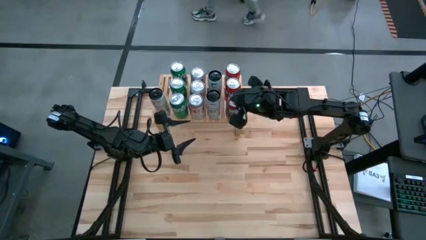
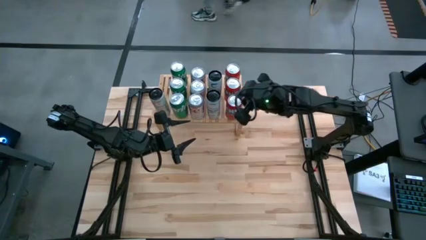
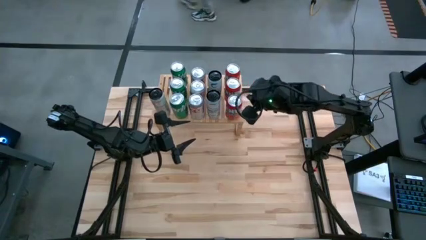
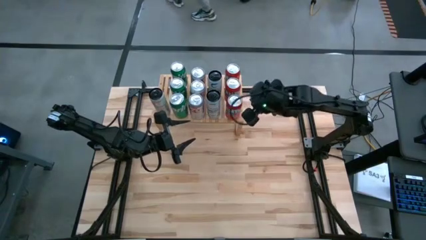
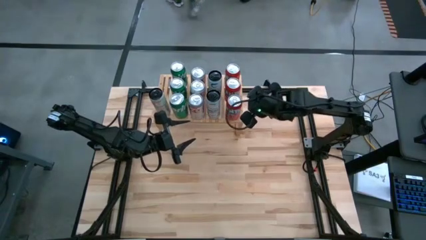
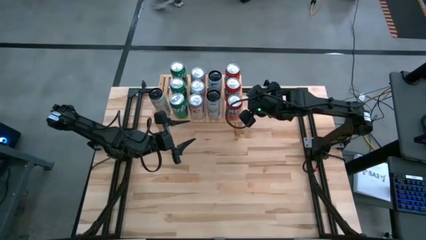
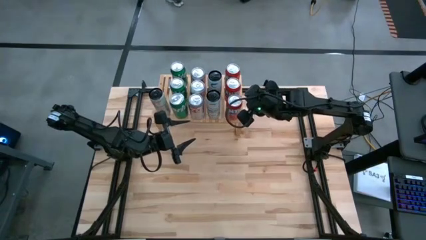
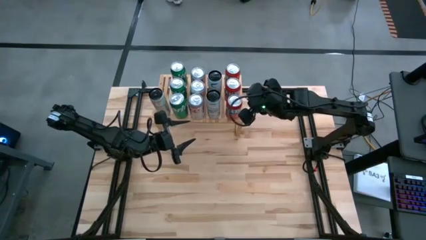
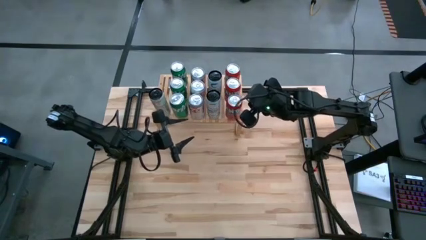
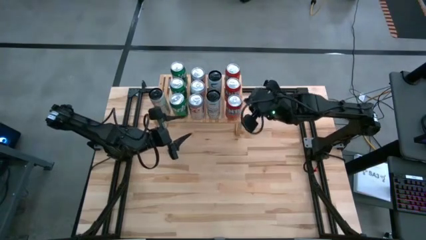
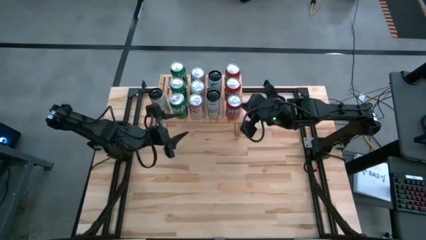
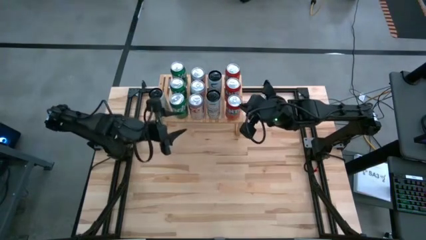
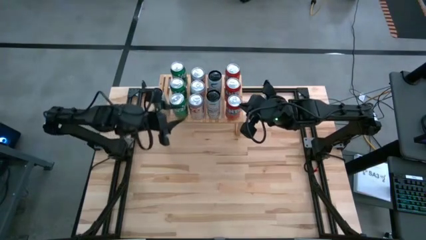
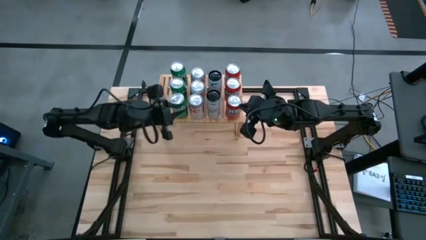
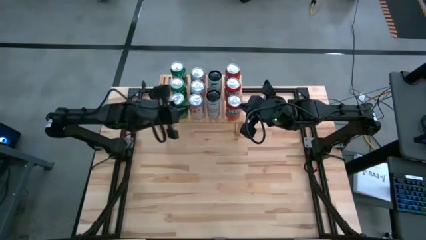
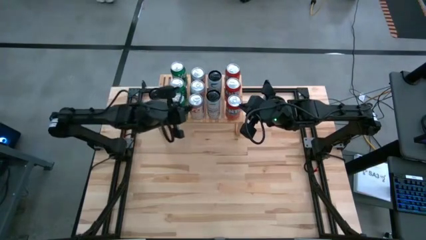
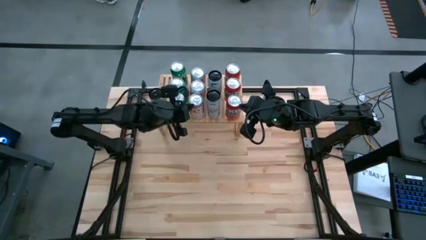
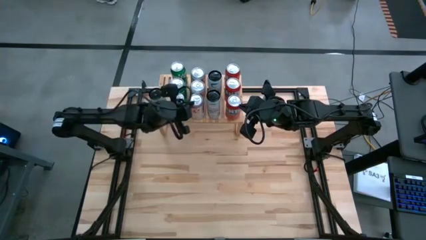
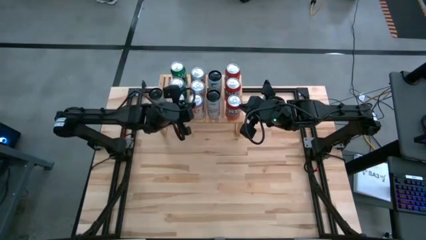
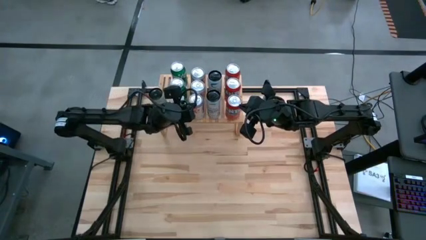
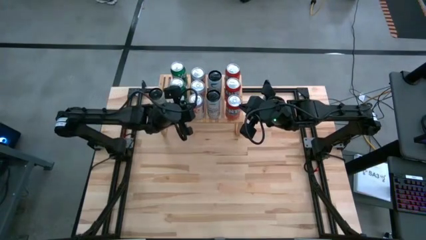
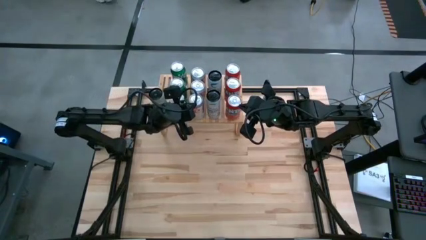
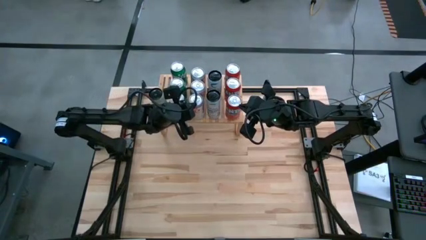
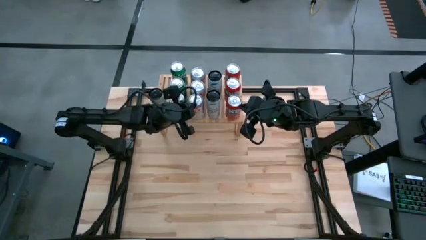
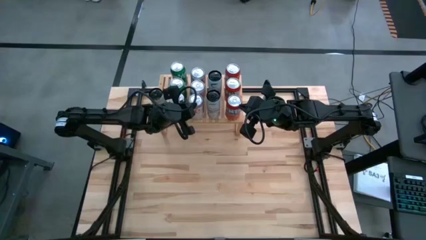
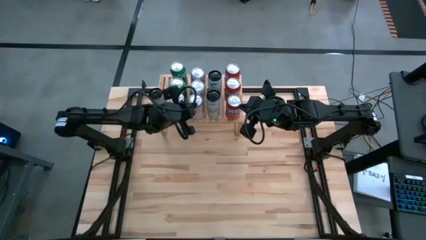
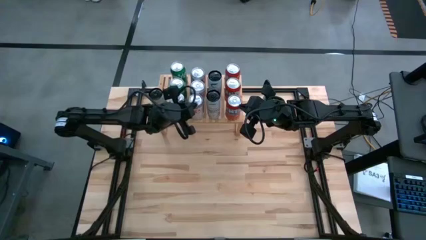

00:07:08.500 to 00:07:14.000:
Task: Place canned beverage on shelf
Adjust the white soda can

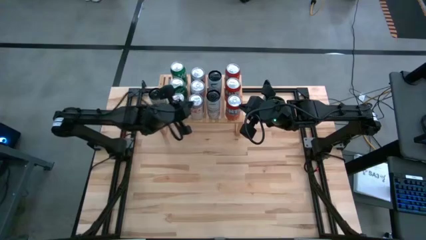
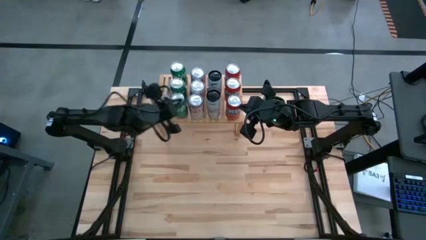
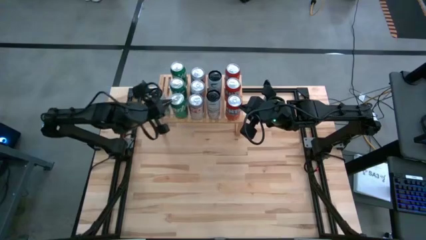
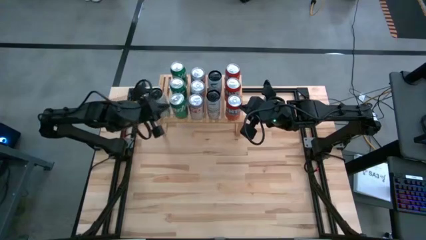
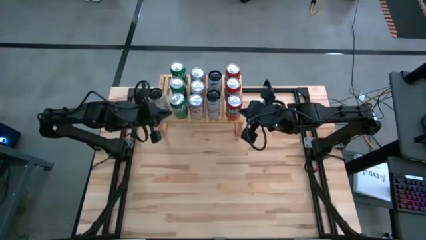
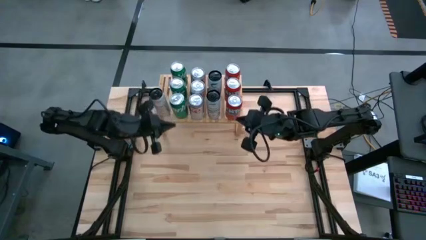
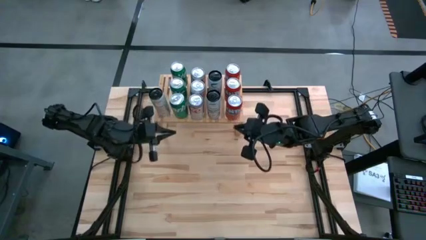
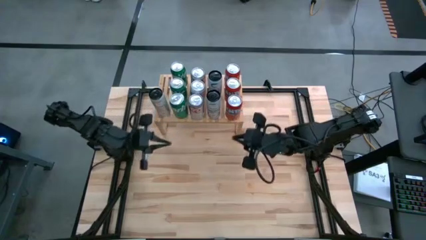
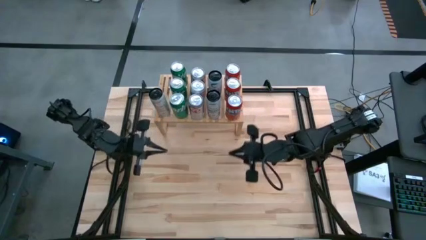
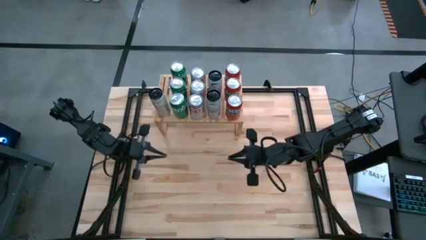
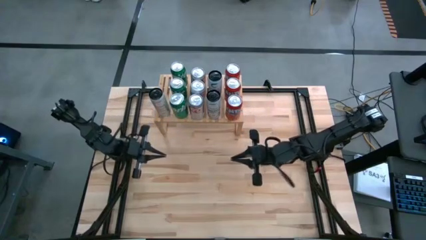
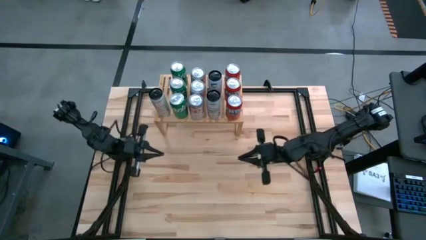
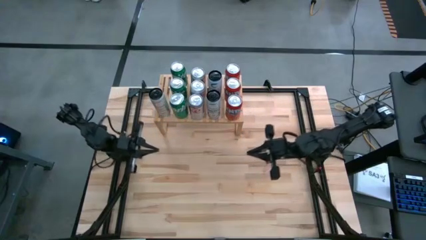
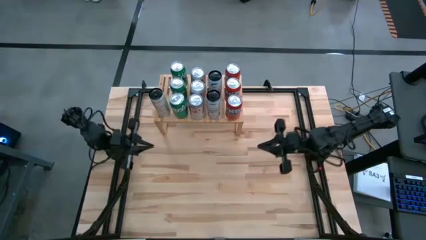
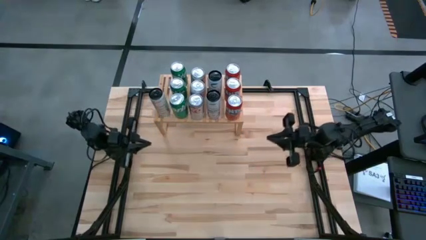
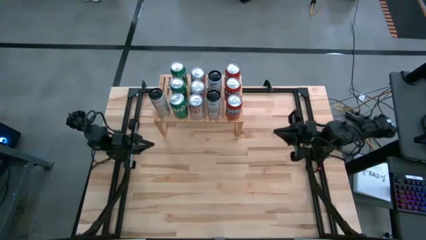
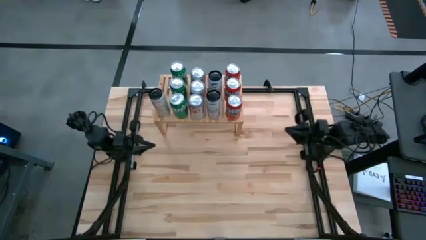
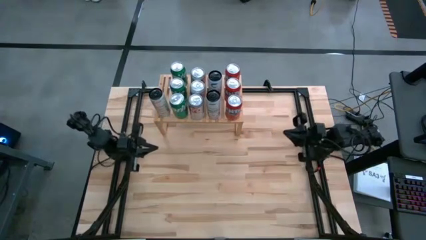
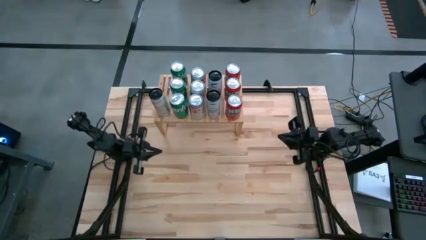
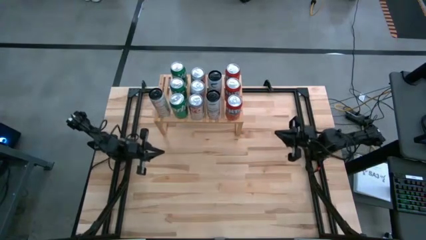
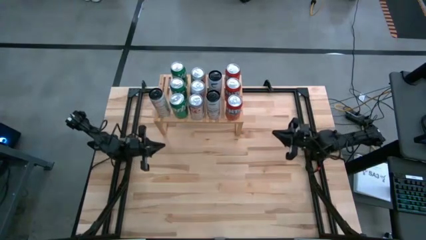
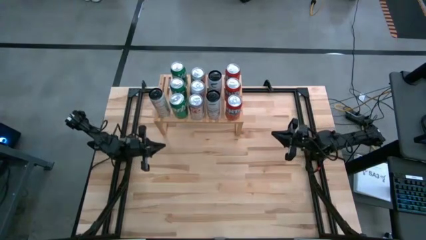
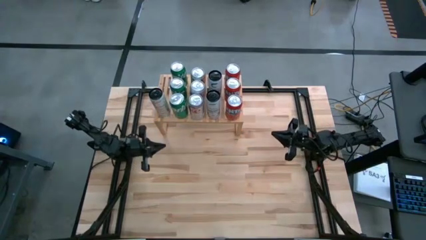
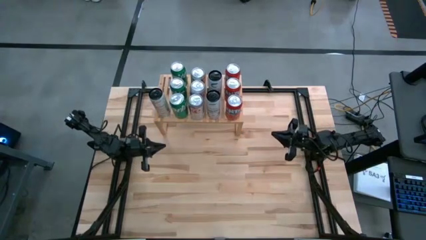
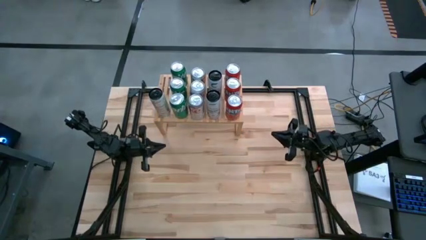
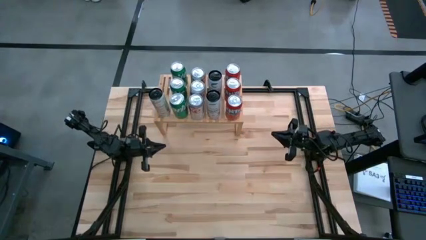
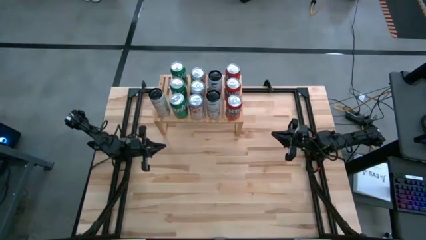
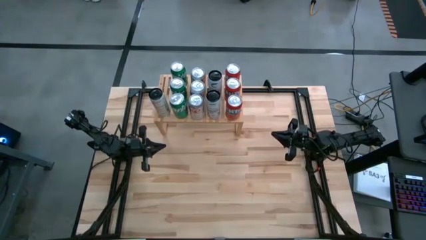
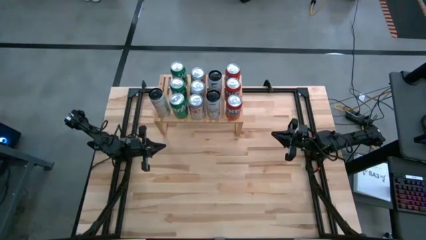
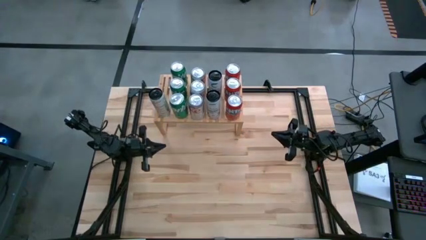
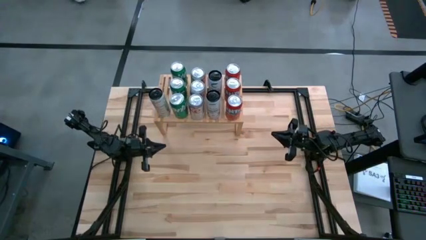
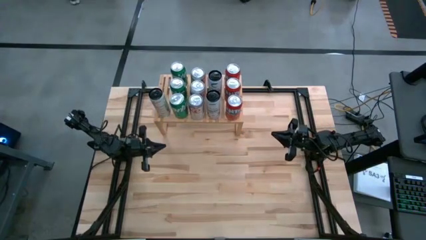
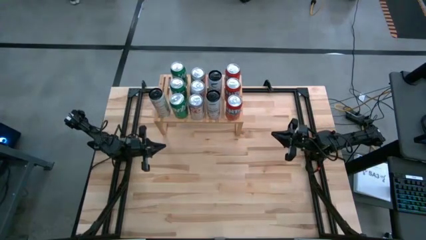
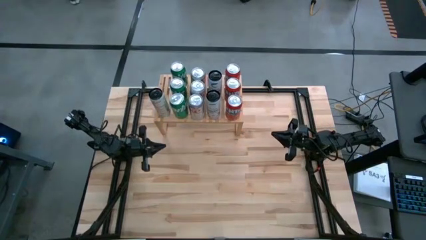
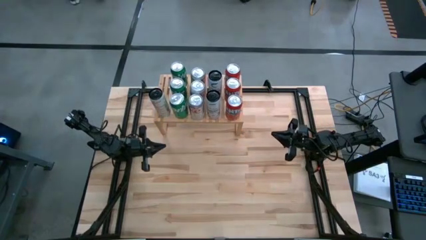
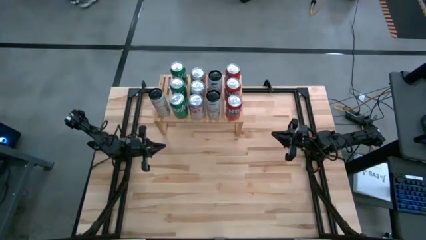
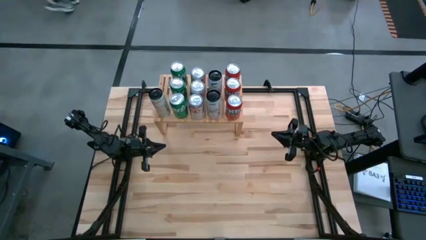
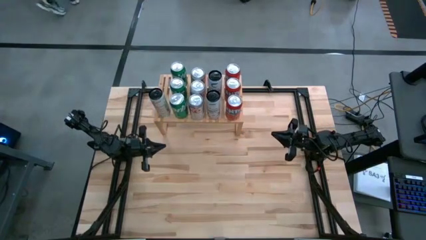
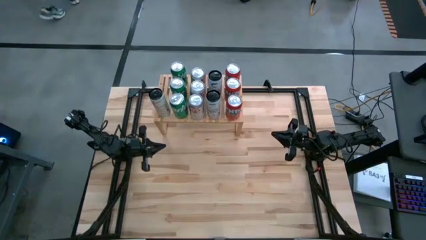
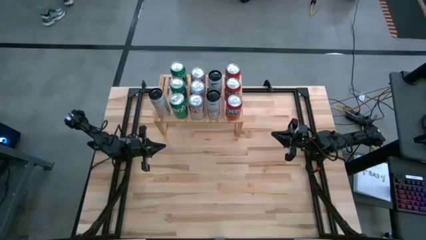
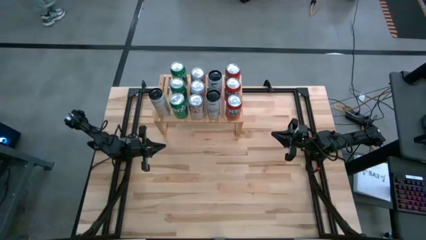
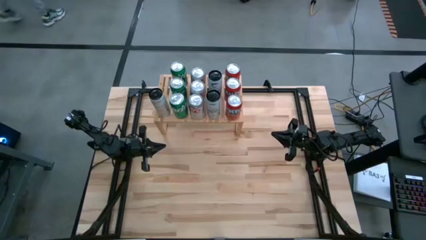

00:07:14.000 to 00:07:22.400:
Return to Home Position

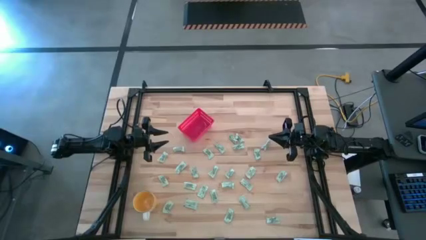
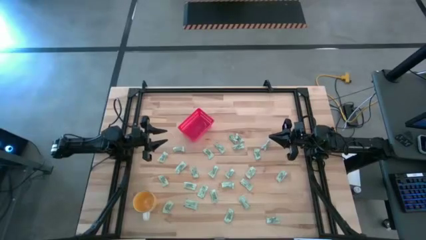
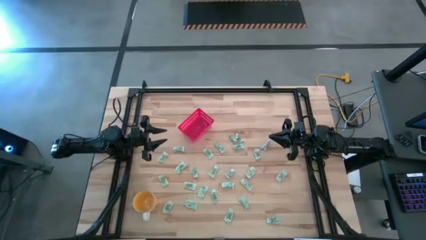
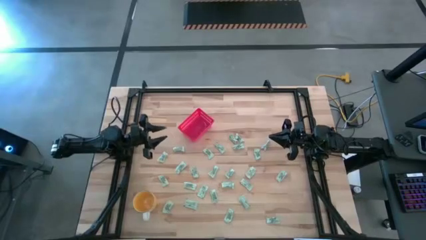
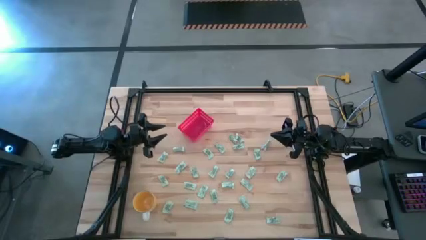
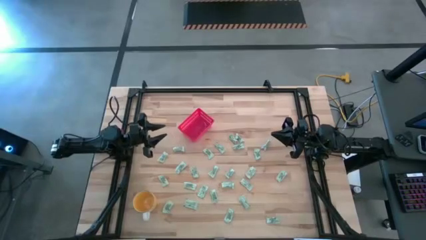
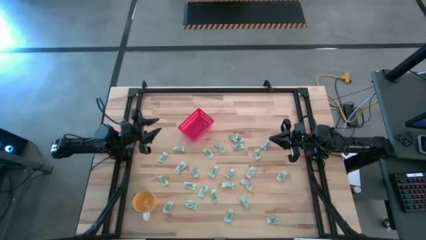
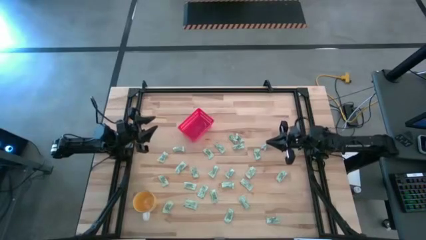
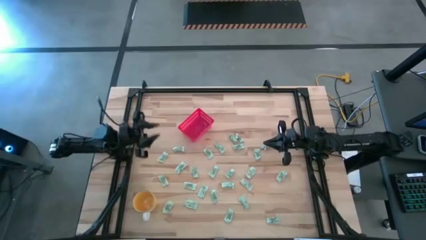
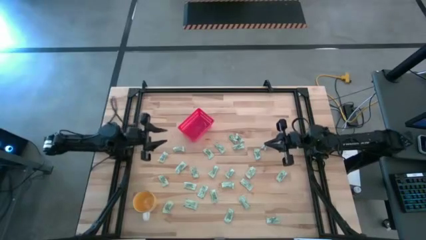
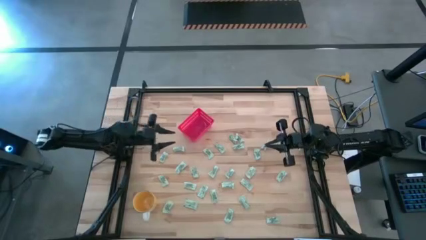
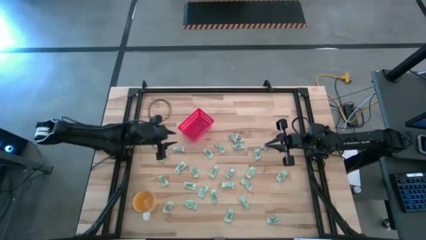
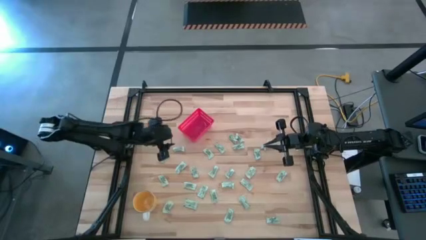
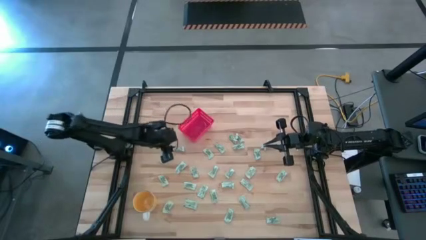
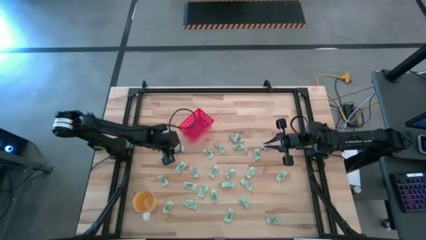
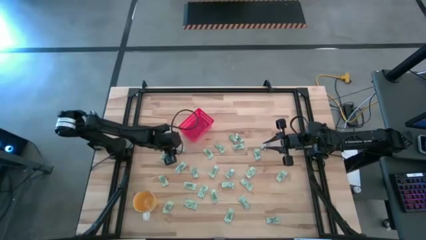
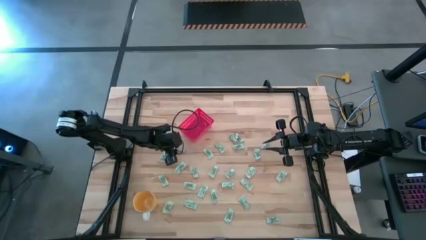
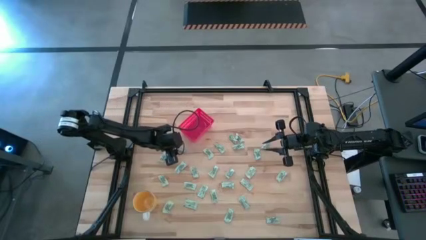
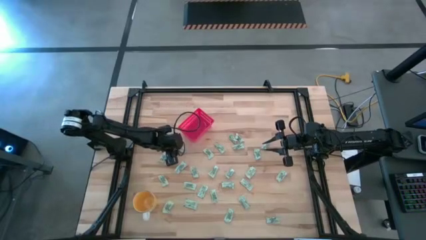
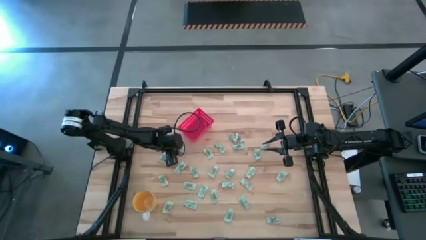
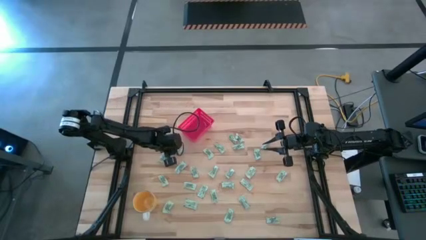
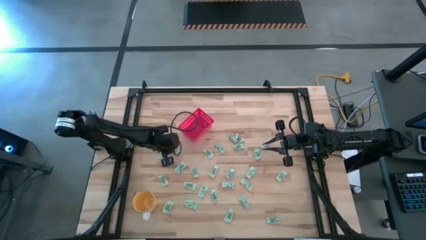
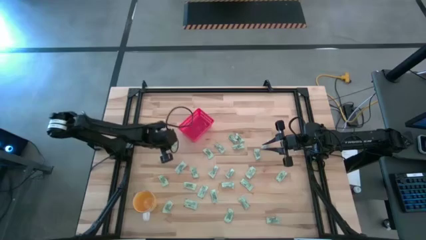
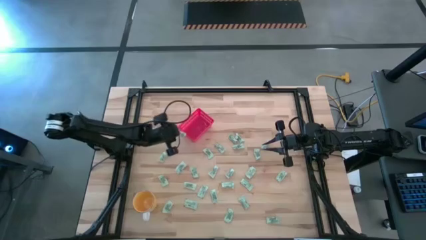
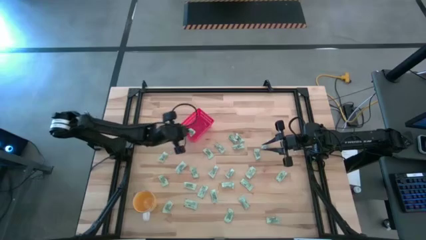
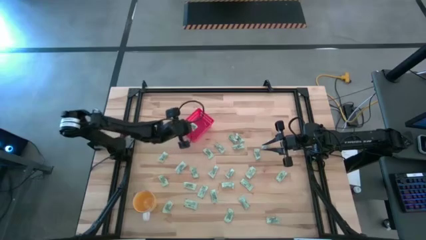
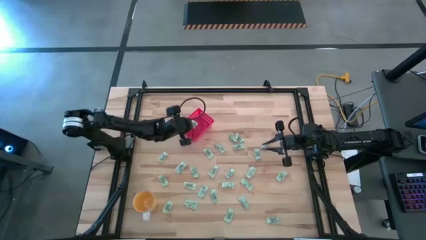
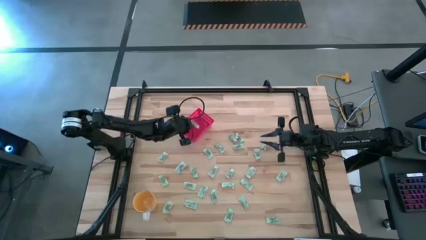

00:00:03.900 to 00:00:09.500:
Task: Pick and place Stevia / Truvia into bins
Put the white stevia packet into the red bin
